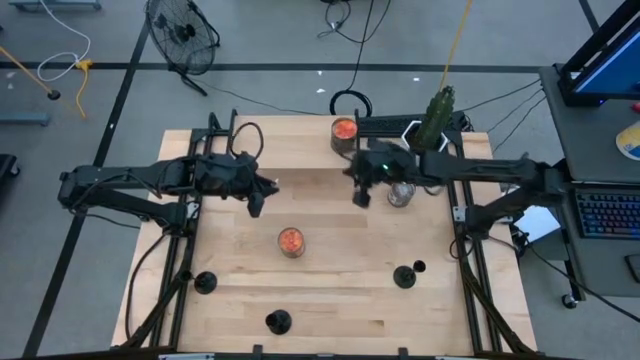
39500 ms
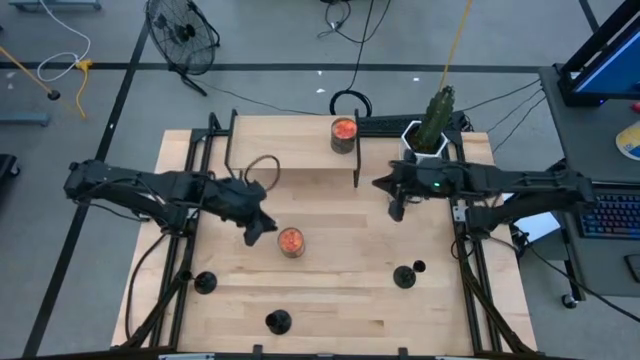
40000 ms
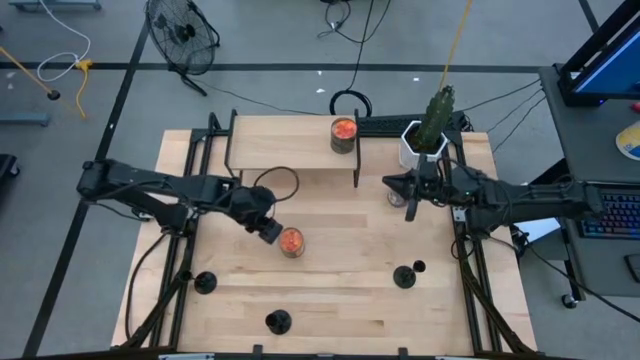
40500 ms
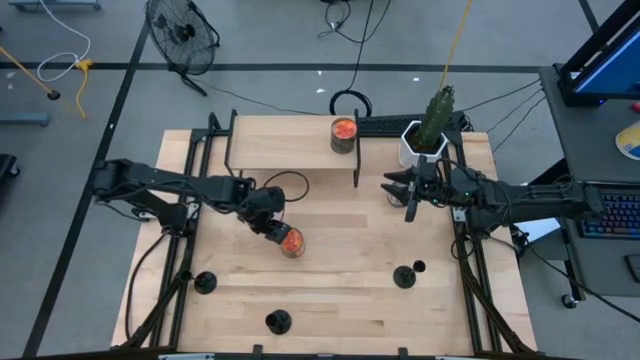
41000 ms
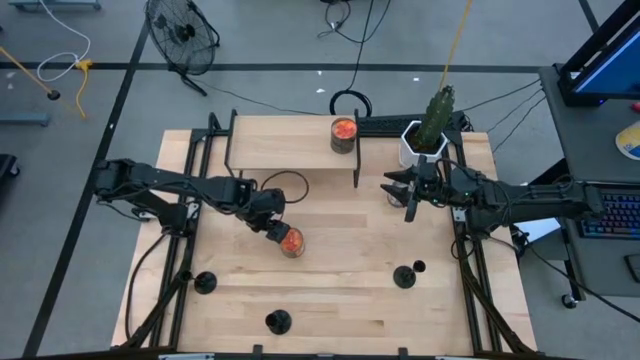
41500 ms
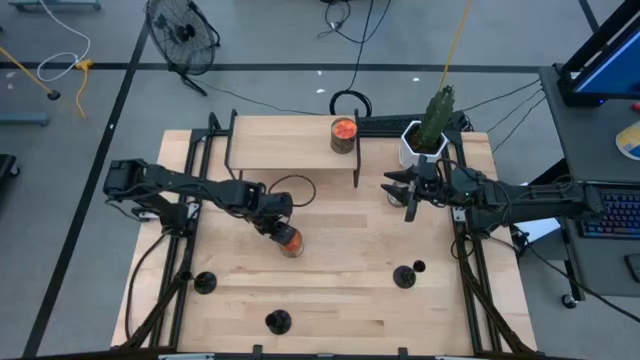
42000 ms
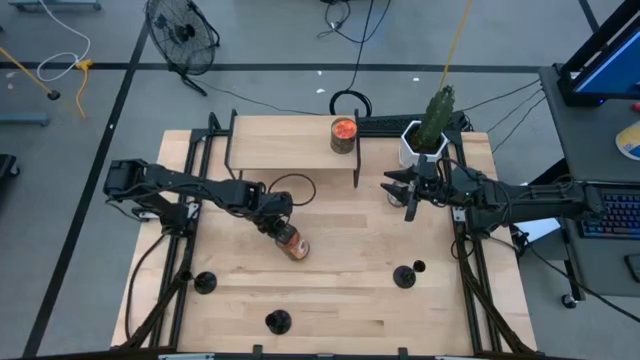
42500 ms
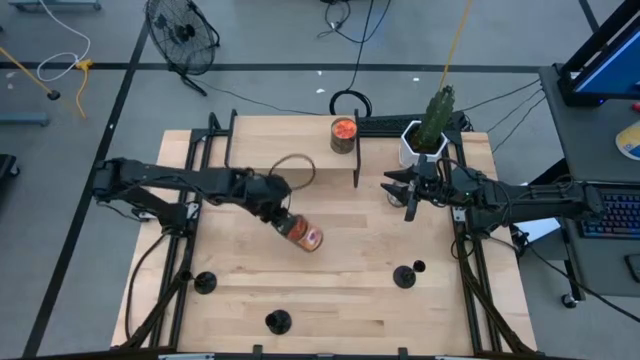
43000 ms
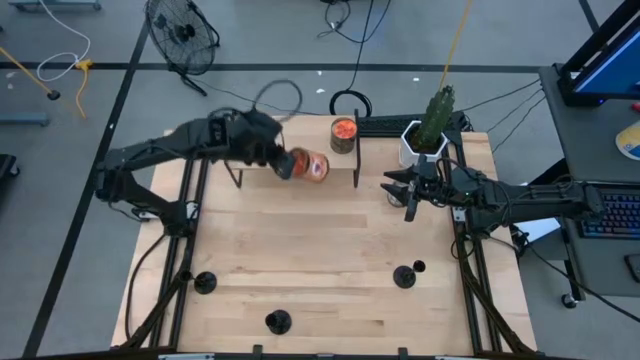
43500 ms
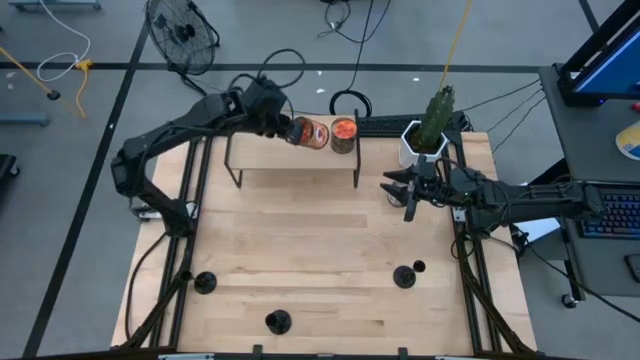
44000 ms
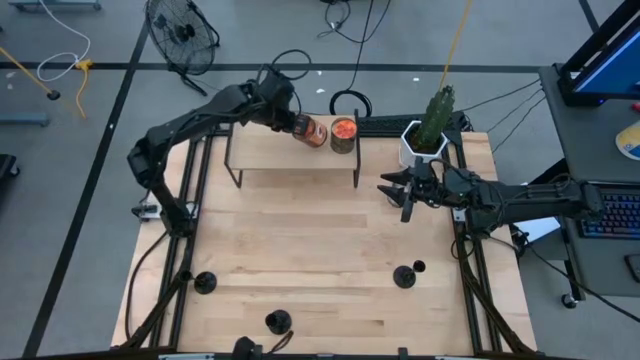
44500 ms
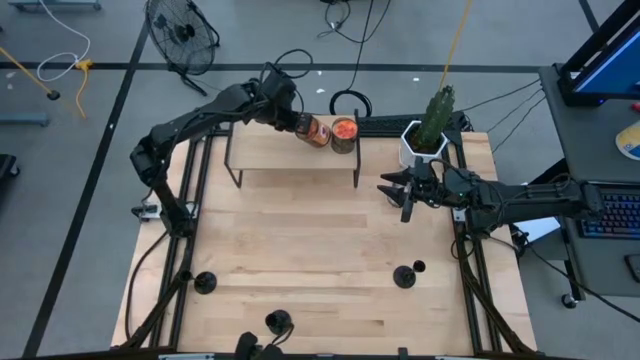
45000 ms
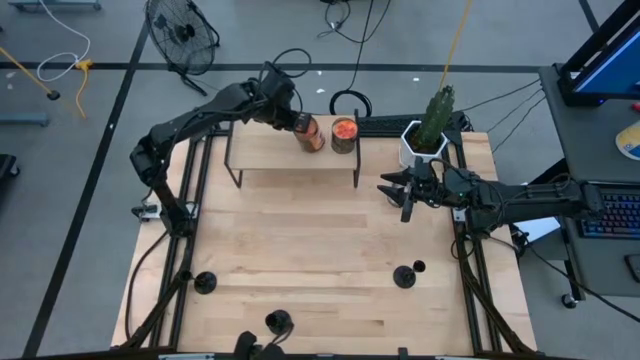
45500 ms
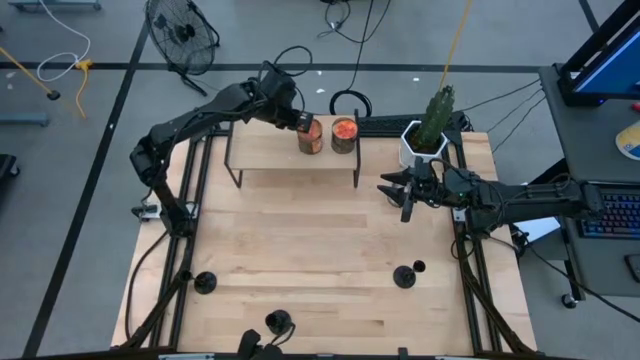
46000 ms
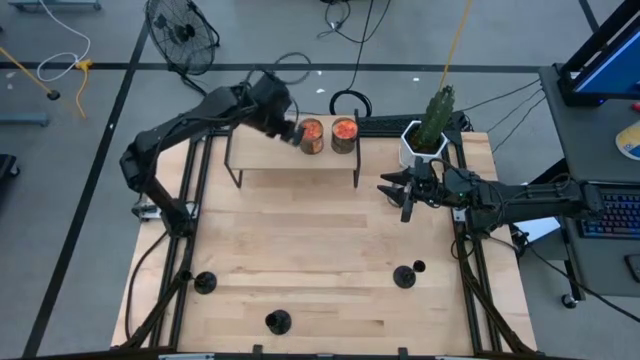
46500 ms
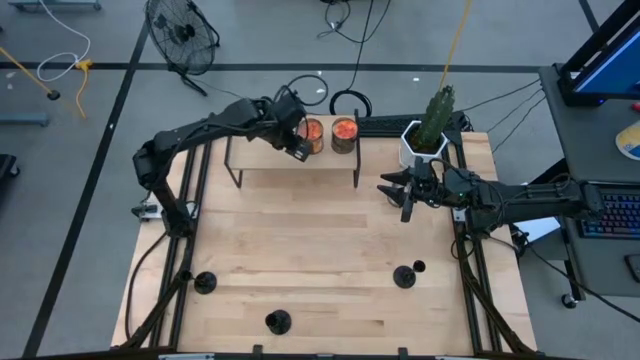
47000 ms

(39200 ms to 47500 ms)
Task: Pick & Place candle stick holders
Put the orange scented candle on the shelf

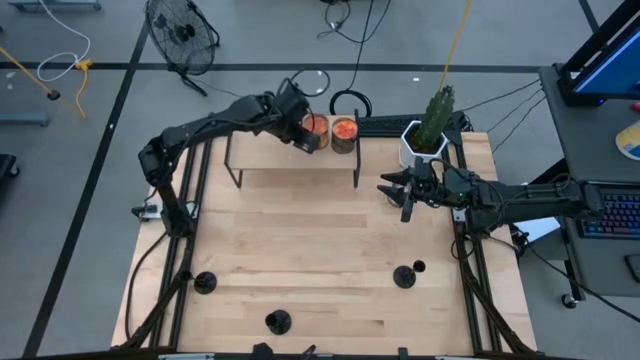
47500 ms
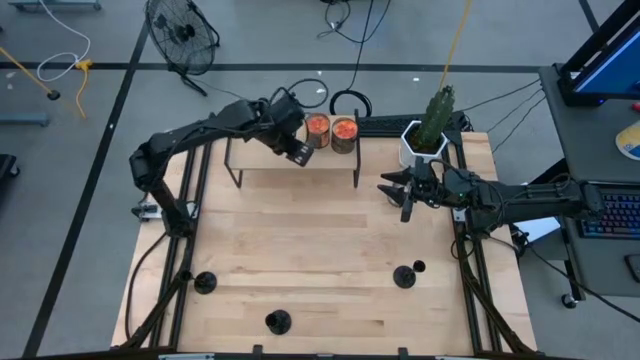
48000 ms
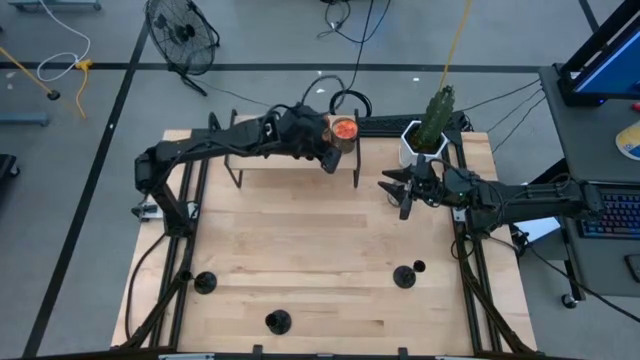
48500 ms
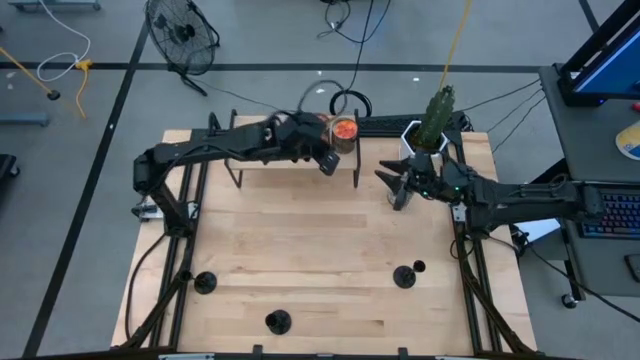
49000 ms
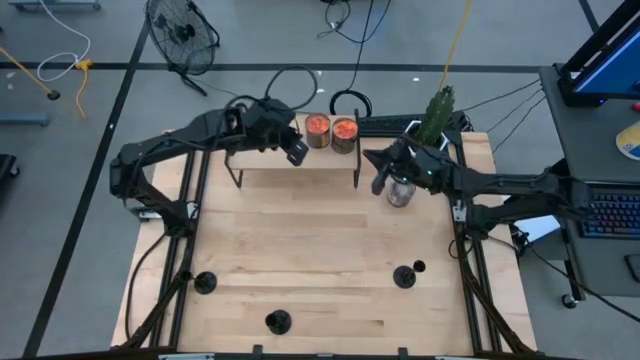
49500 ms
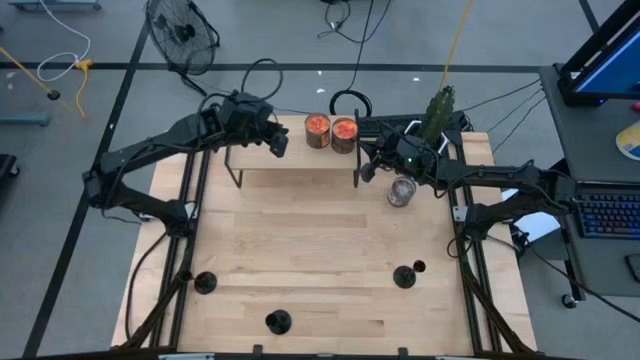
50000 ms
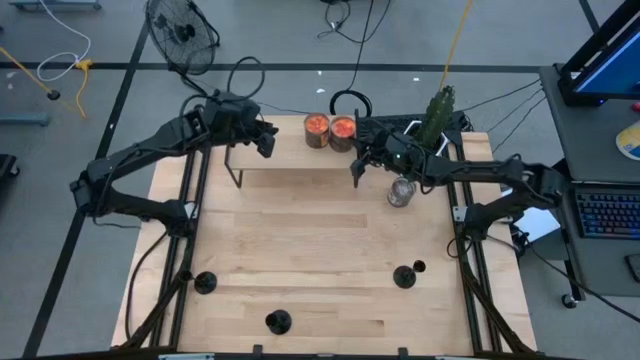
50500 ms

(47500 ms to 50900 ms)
Adjust the right orange scented candle on the shelf

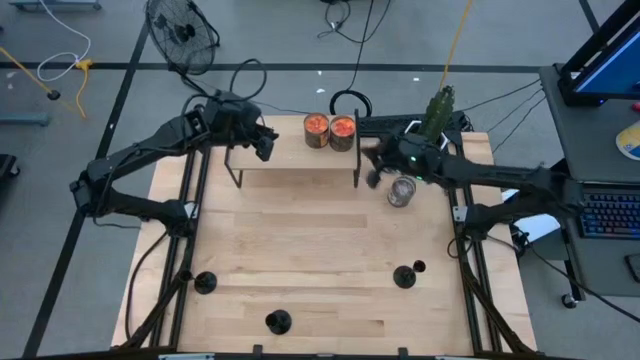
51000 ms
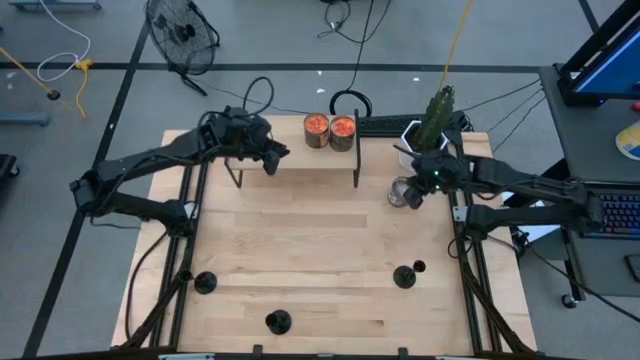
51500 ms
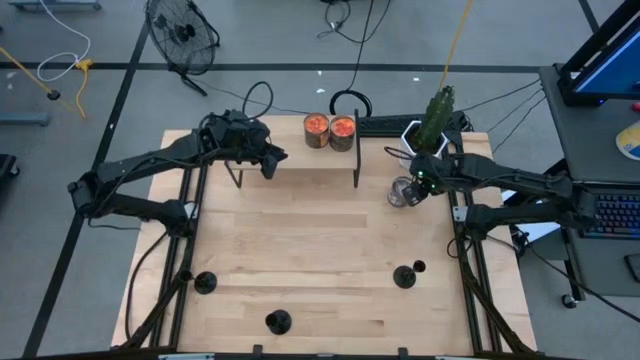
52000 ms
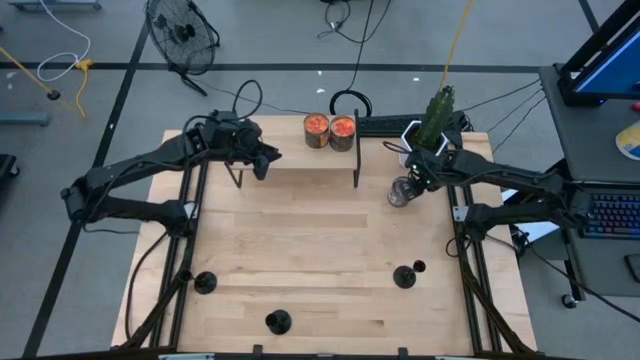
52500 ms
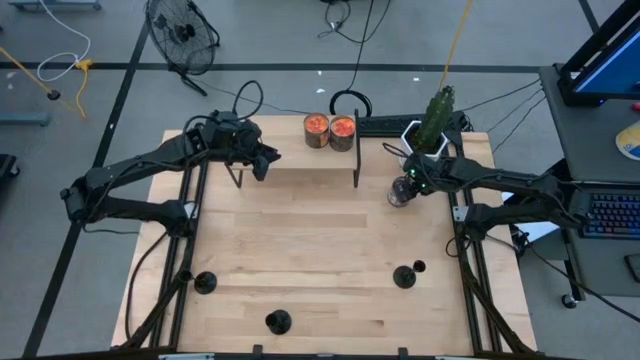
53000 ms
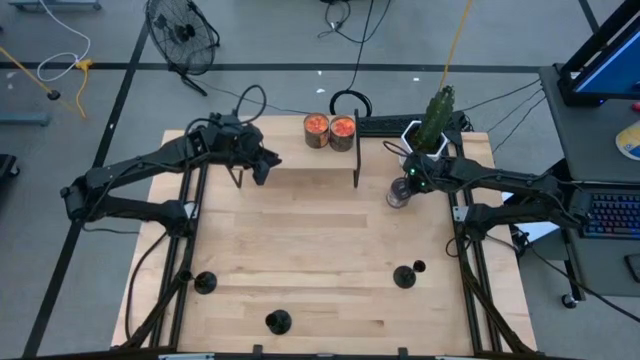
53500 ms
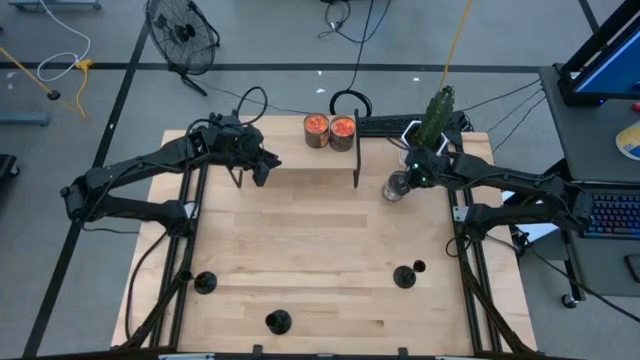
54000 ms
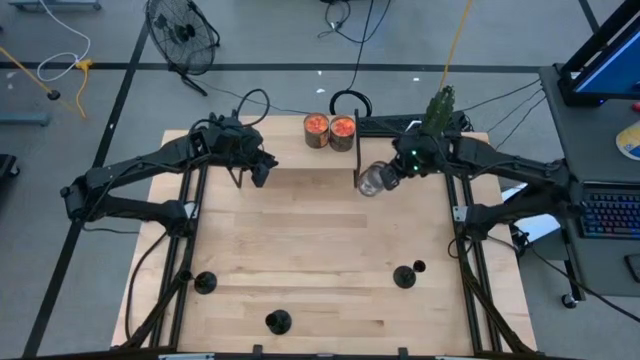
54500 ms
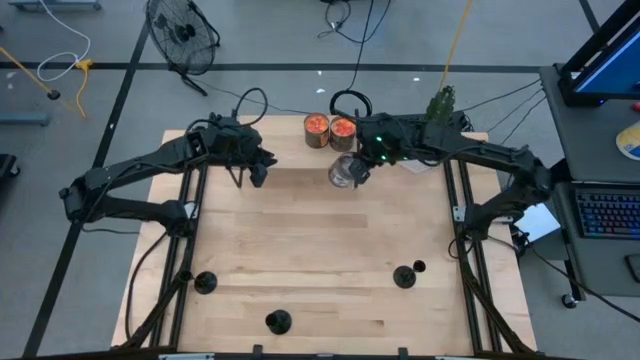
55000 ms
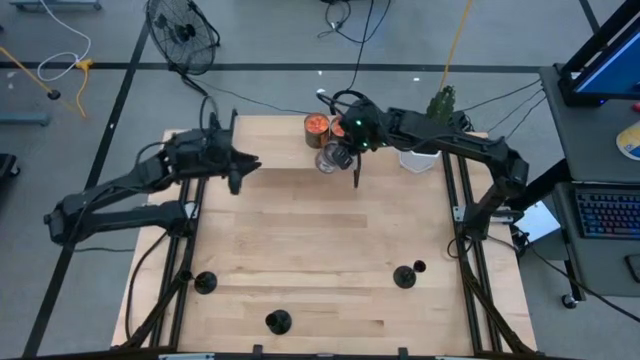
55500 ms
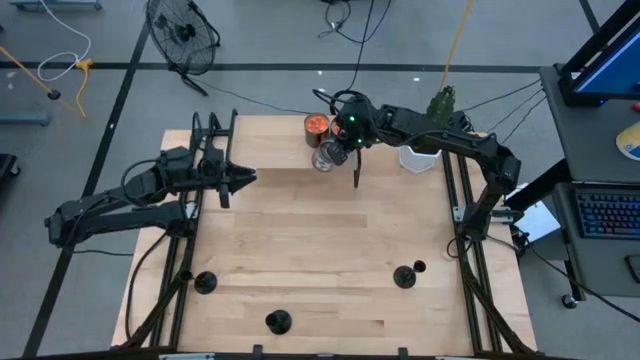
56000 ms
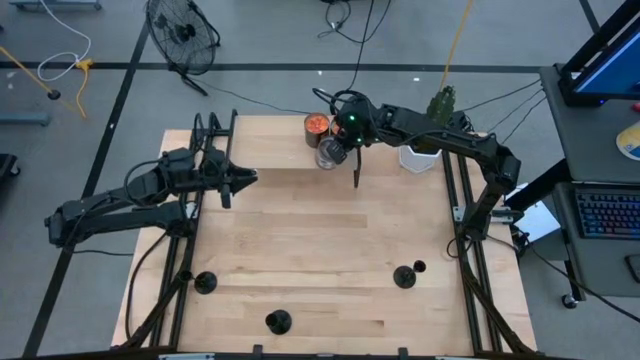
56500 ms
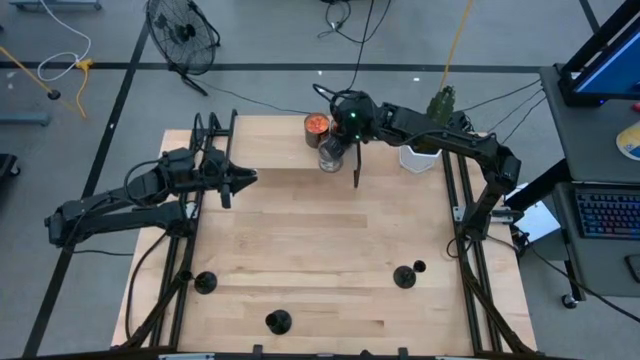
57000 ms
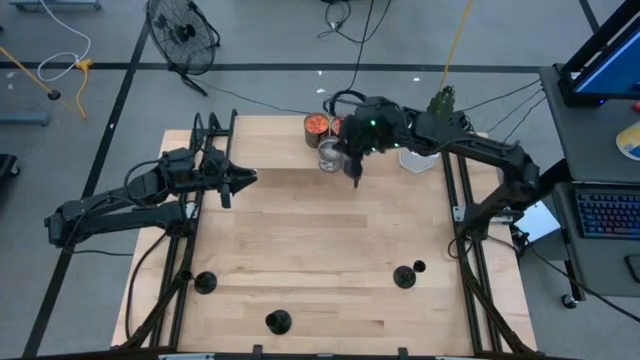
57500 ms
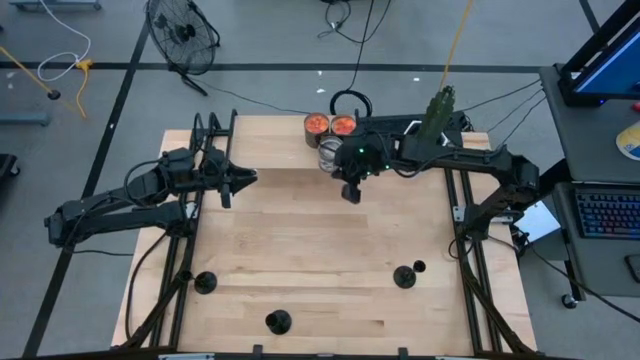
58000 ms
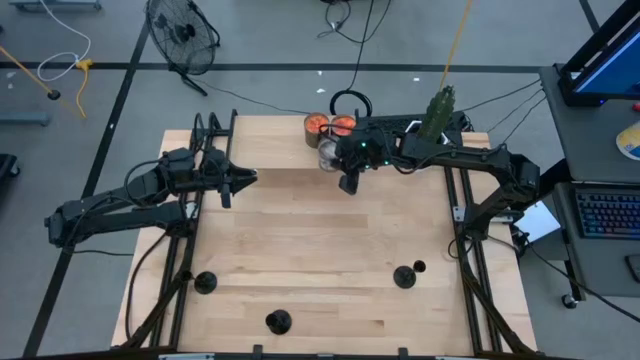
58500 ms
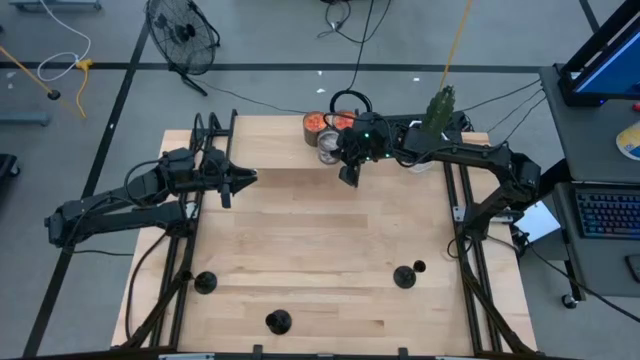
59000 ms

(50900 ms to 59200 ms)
Put the brown scented candle on the shelf

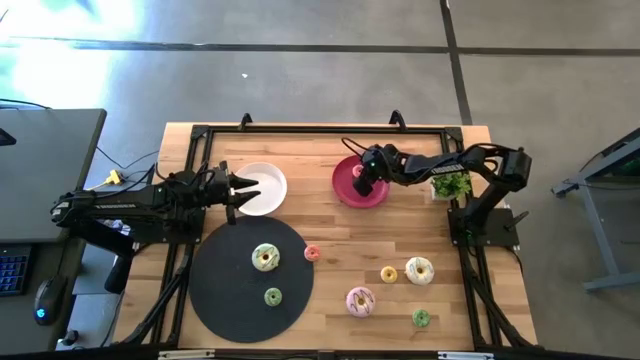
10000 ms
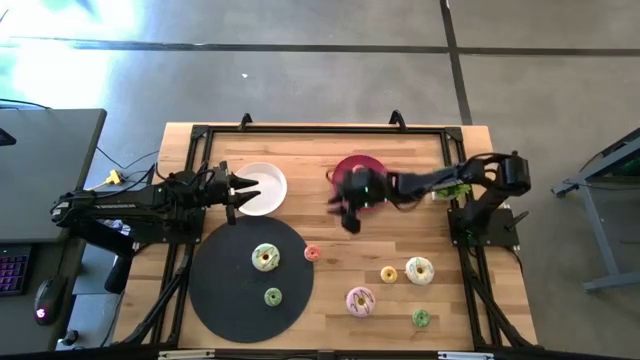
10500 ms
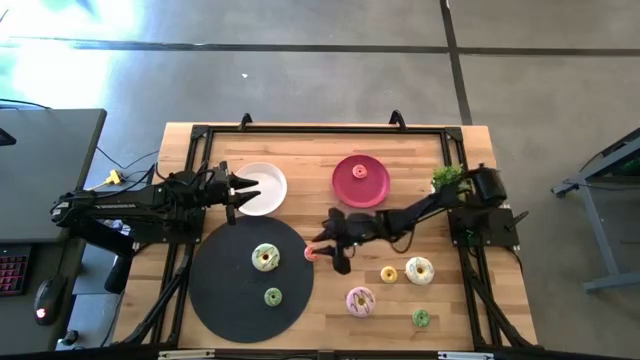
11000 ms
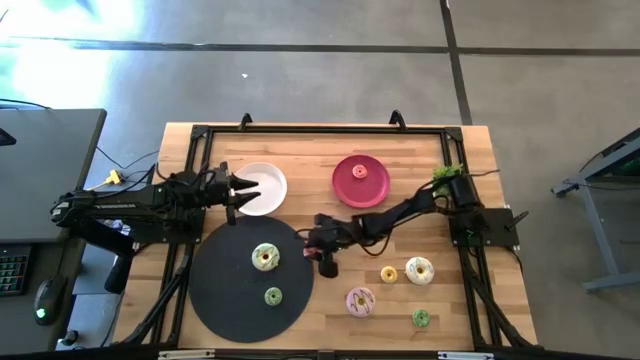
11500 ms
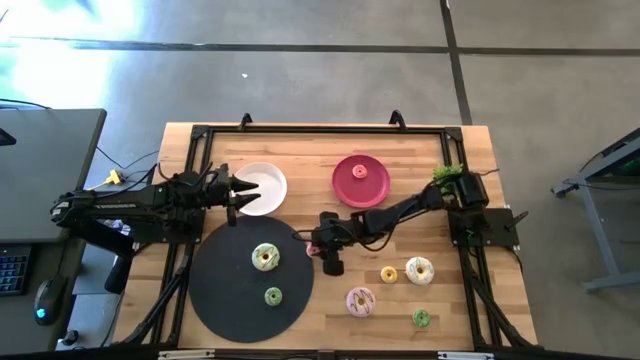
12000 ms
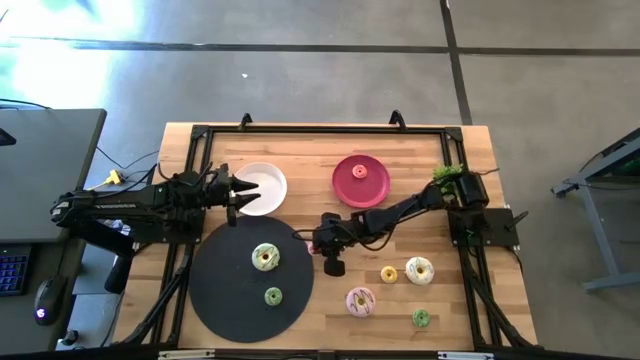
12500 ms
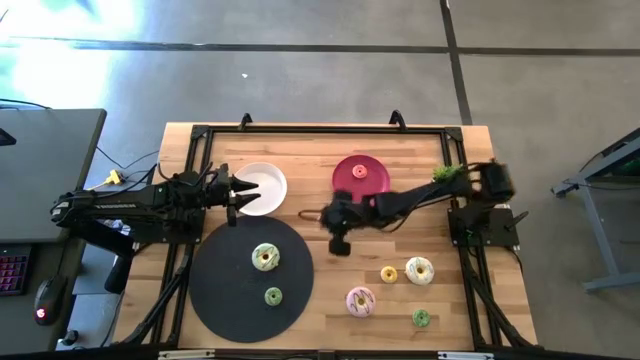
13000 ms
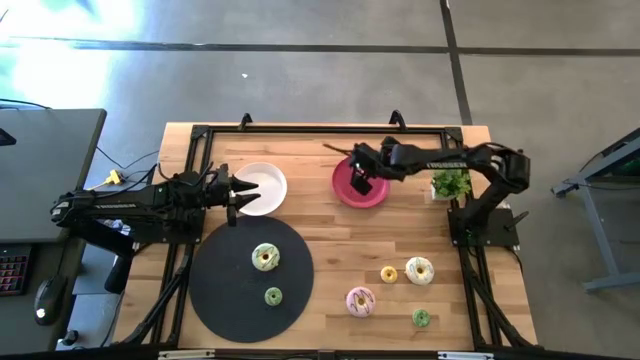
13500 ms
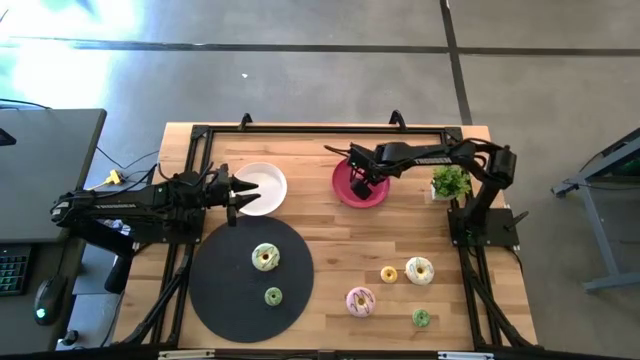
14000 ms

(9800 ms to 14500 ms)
Task: Pick & Place donuts
Put the small pink donut on the pink plate
